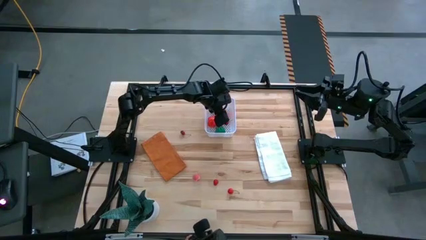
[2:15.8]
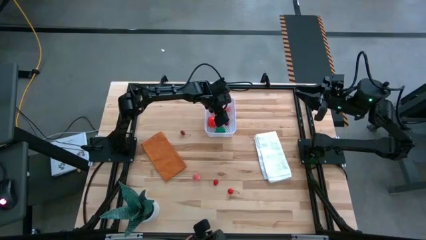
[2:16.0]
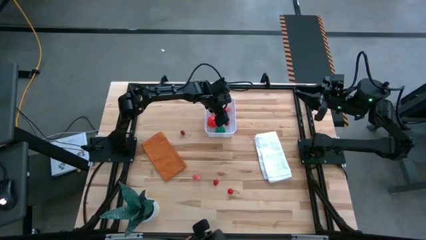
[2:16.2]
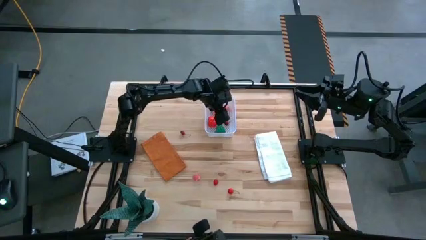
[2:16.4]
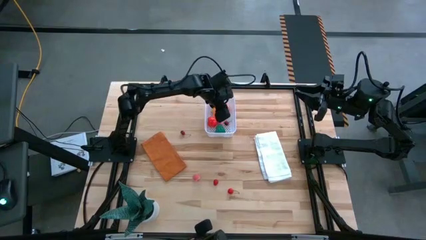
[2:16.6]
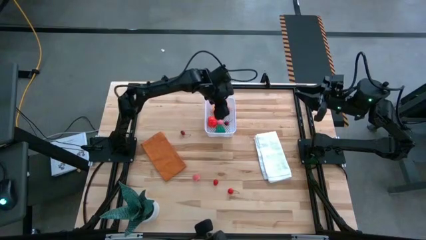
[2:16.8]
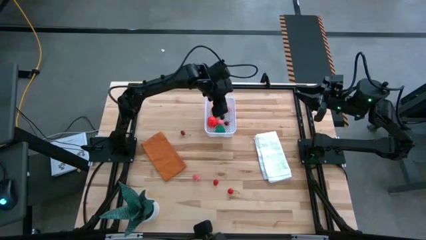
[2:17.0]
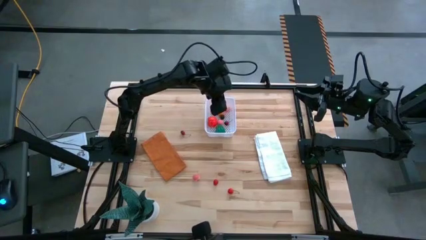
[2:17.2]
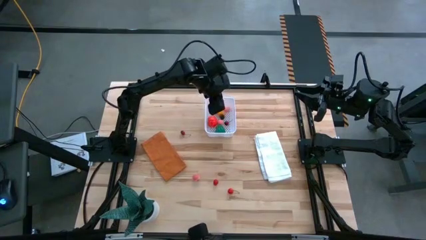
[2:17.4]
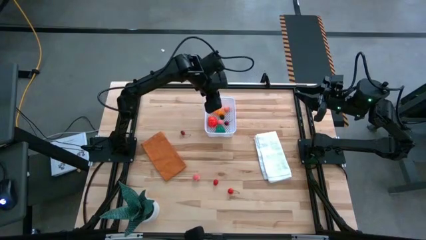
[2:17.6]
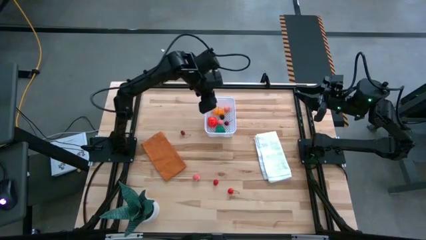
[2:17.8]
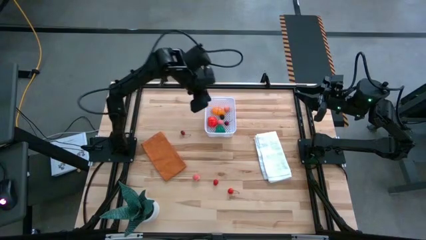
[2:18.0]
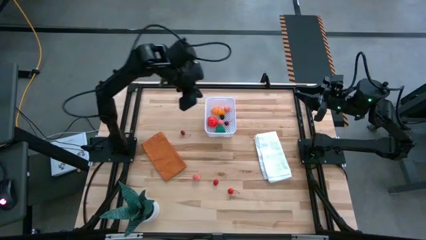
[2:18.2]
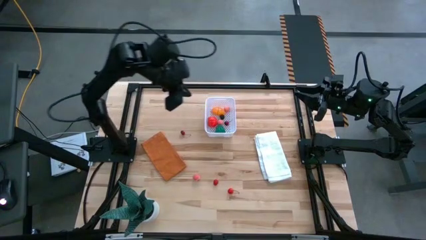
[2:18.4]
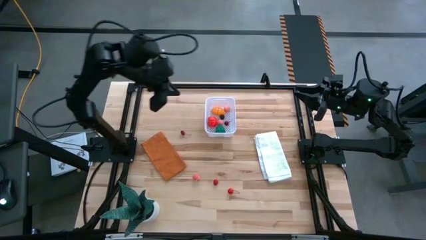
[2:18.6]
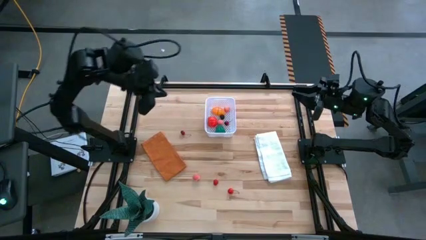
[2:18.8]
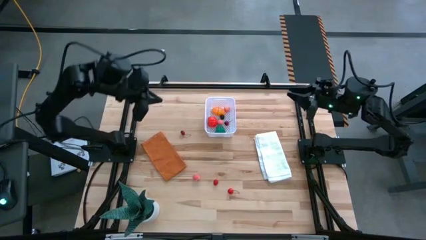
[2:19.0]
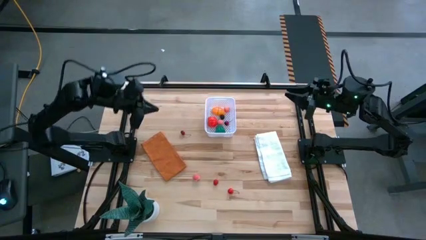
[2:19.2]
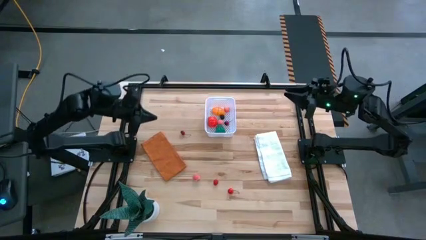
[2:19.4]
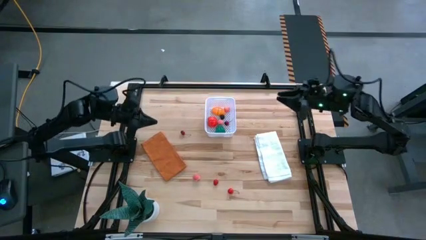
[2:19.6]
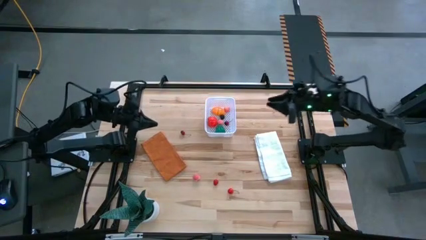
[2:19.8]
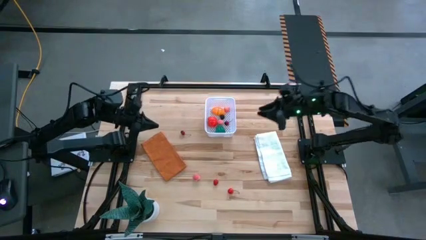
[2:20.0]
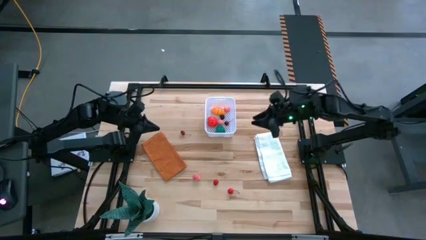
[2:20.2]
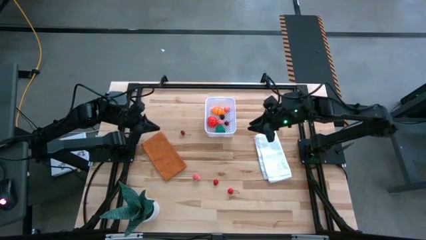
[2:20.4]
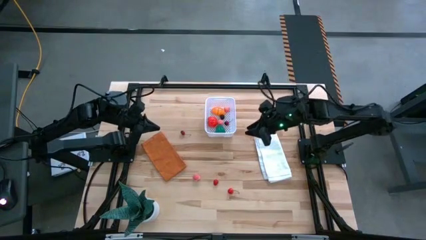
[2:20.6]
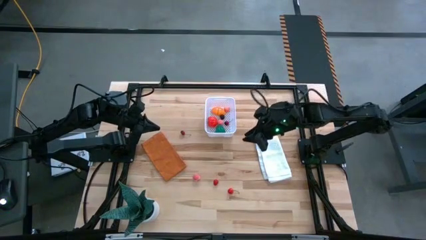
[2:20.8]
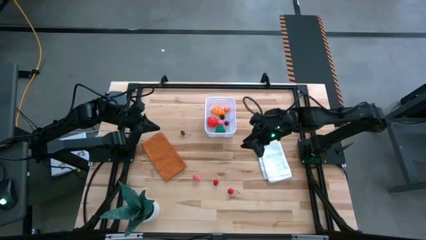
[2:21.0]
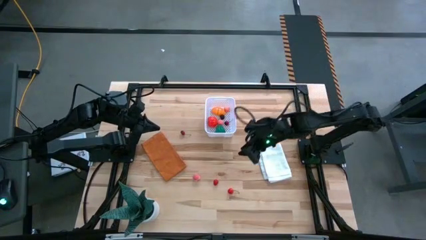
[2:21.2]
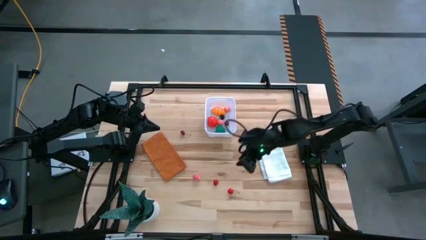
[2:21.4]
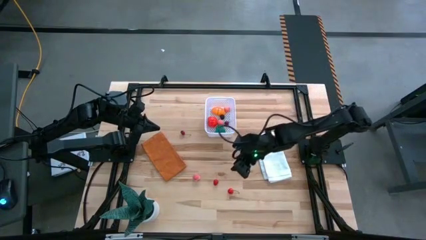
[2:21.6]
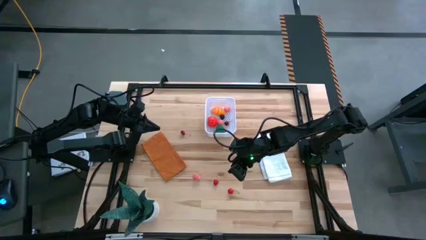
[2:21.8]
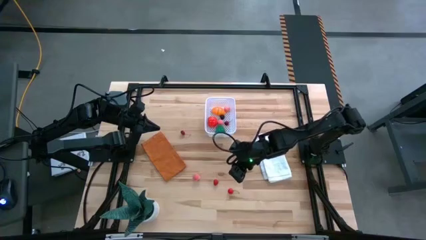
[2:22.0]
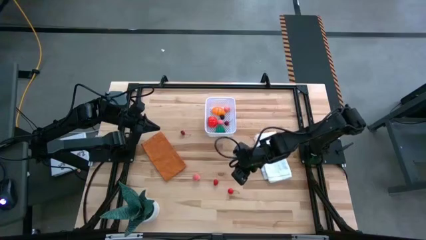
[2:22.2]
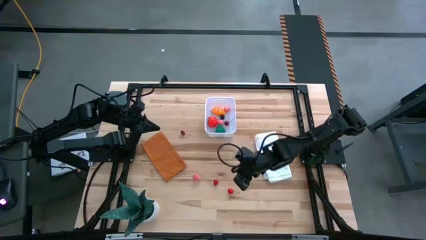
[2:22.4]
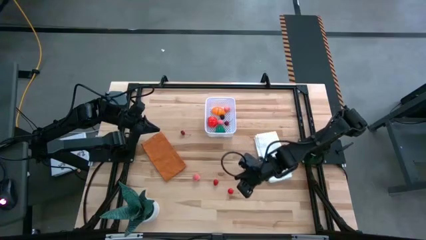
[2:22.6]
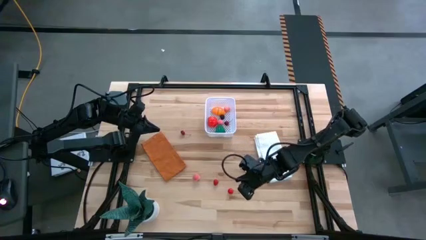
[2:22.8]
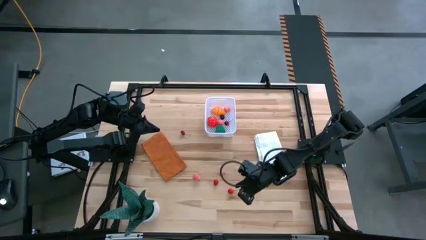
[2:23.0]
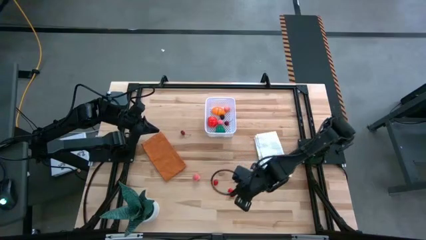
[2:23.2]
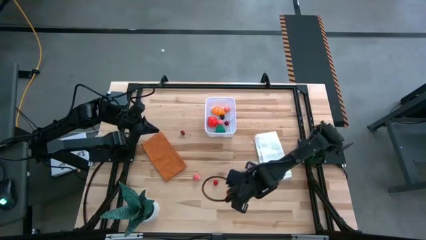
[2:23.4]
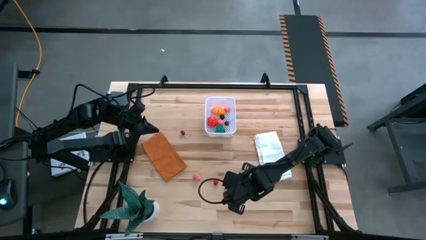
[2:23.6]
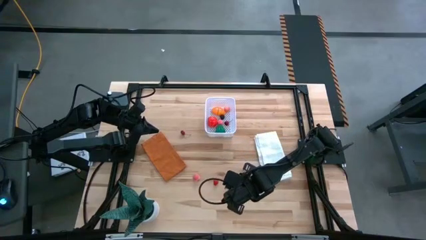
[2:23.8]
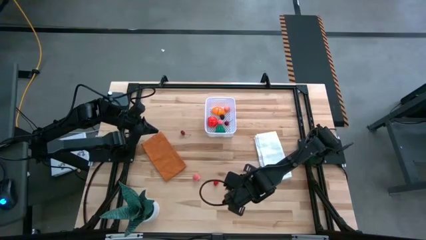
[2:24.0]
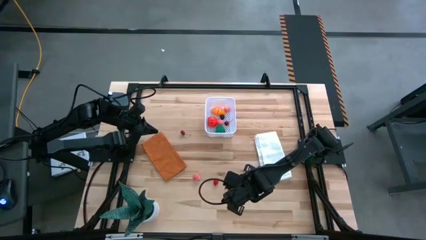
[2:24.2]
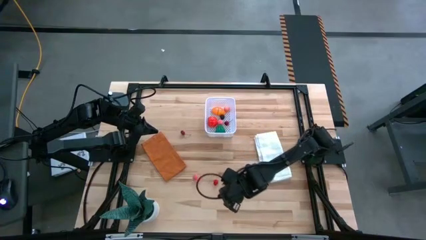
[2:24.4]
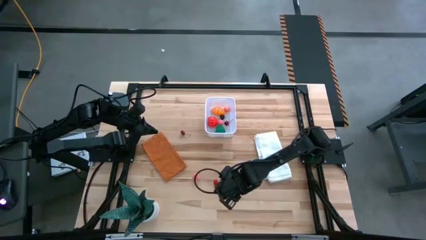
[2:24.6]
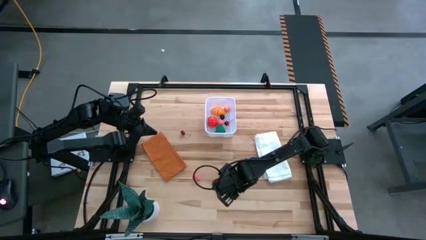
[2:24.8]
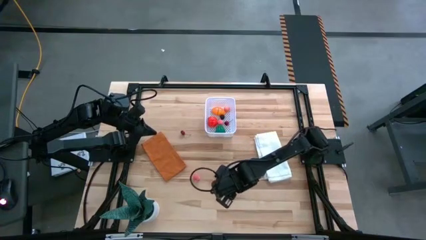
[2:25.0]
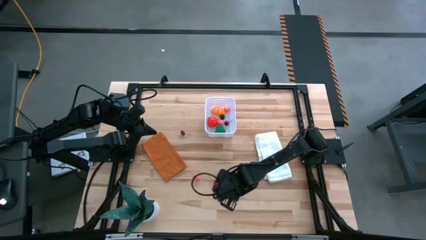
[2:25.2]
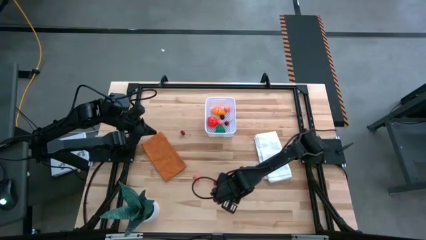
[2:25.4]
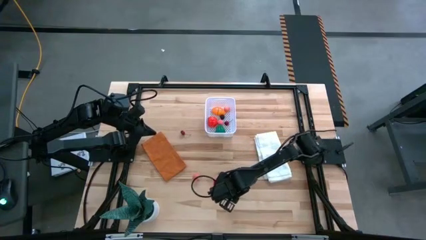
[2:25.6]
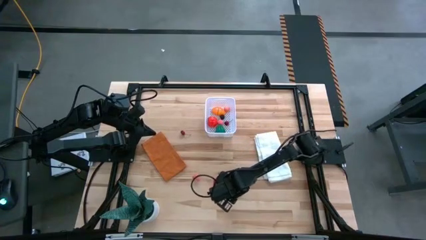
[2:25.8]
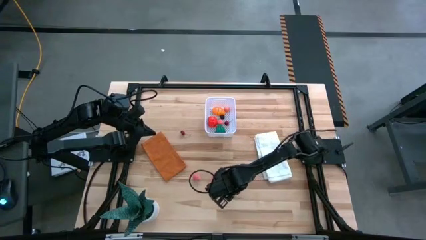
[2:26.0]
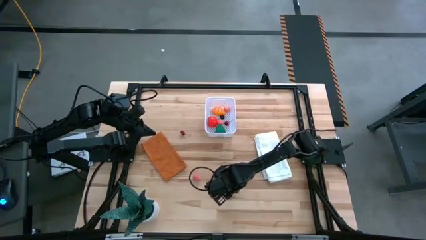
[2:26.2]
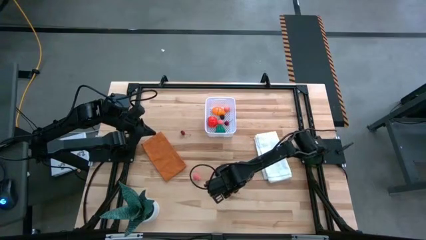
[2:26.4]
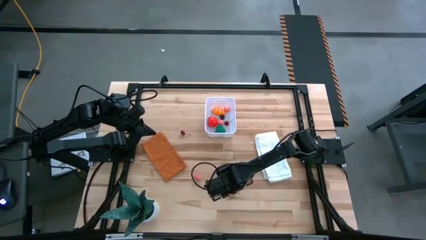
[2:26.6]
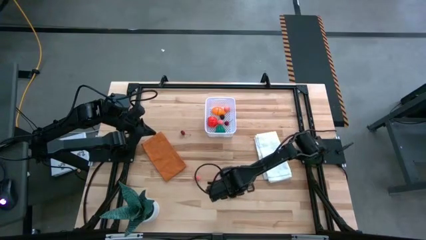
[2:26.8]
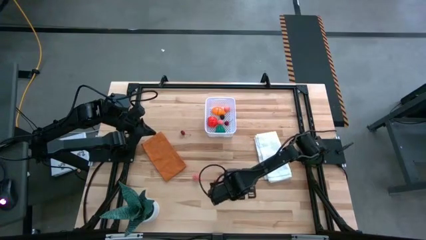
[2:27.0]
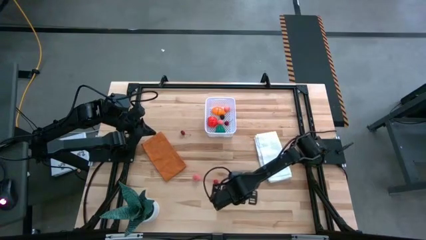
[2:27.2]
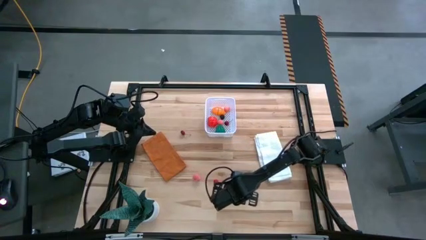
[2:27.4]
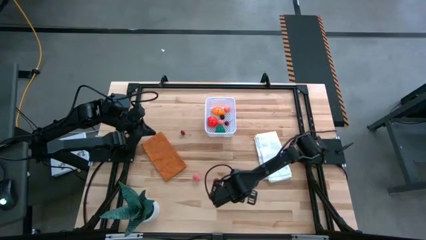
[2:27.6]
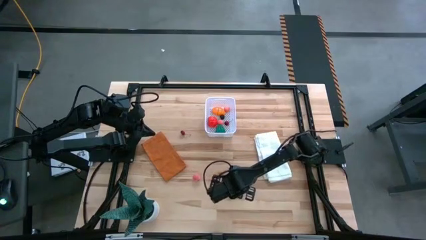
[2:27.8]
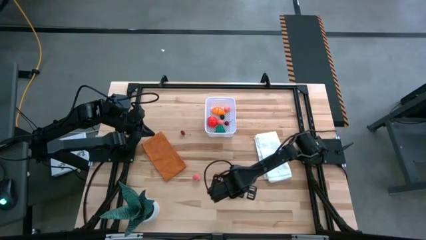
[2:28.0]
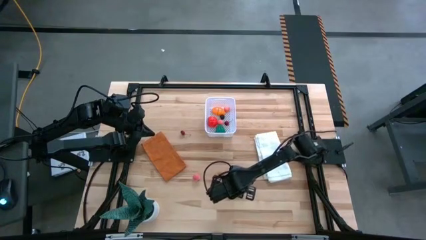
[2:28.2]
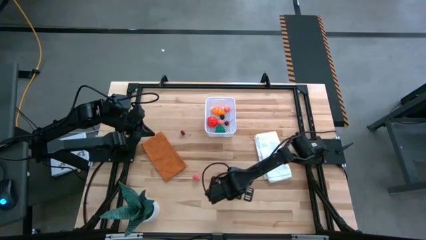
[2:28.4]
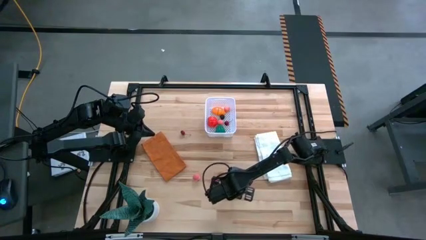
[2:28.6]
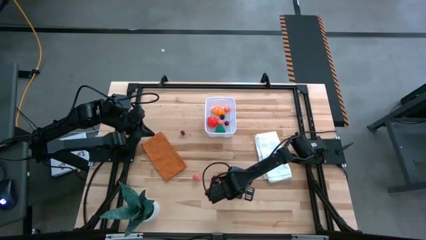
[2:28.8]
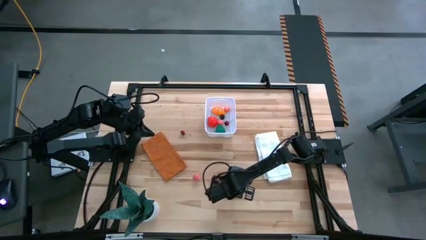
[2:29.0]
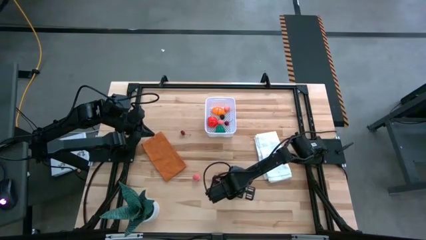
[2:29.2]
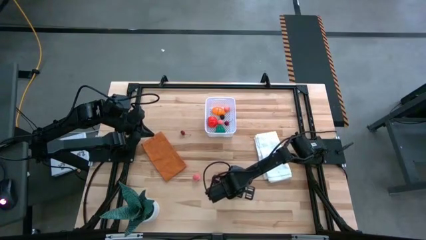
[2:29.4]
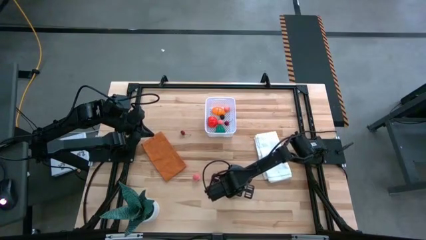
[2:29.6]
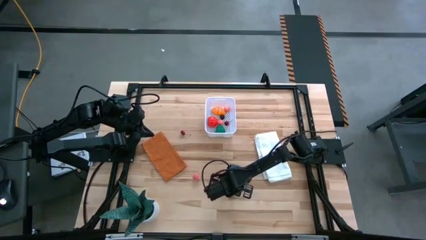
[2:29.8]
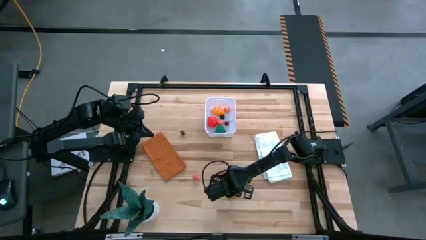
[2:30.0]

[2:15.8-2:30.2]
Task: Pick and placing Produce into tupperware
Put the red cherry into the white bin

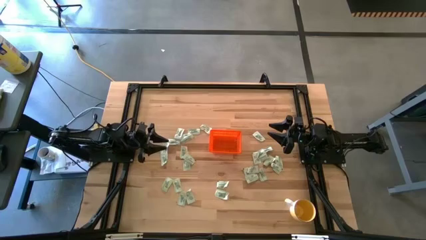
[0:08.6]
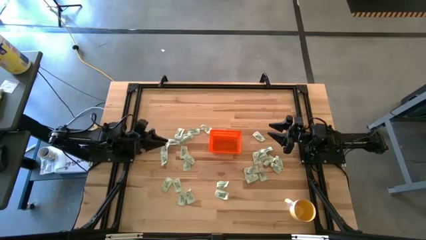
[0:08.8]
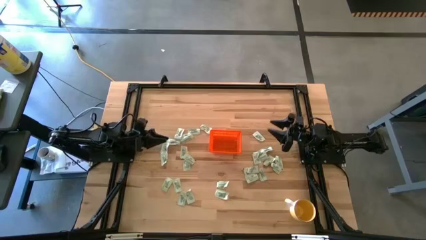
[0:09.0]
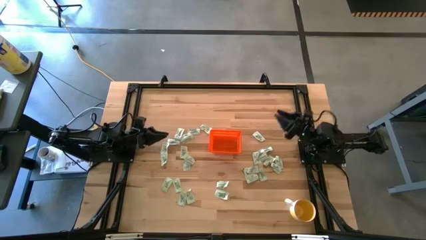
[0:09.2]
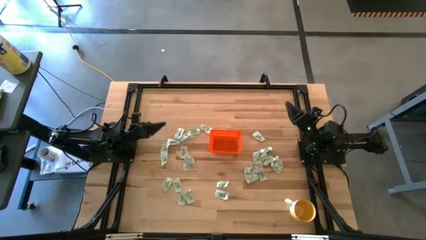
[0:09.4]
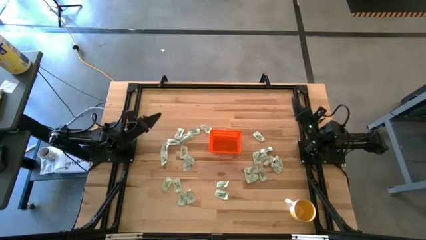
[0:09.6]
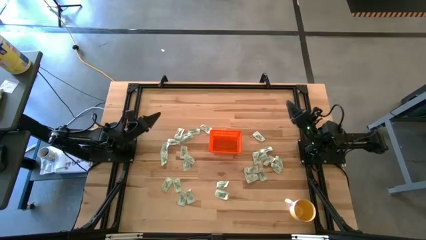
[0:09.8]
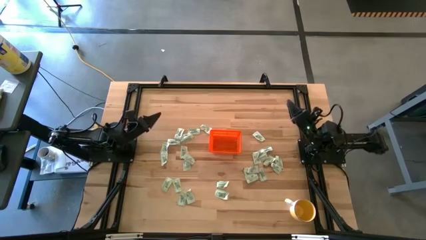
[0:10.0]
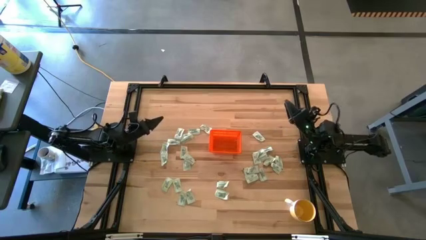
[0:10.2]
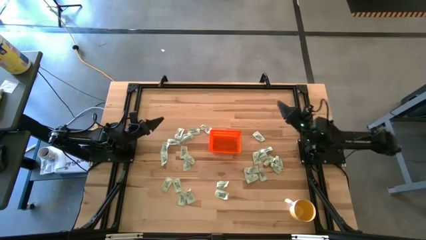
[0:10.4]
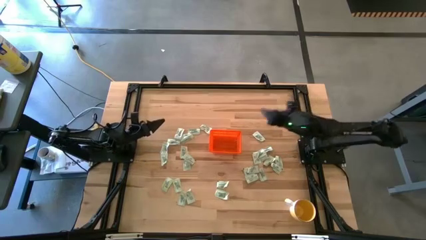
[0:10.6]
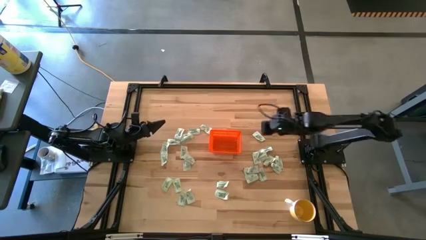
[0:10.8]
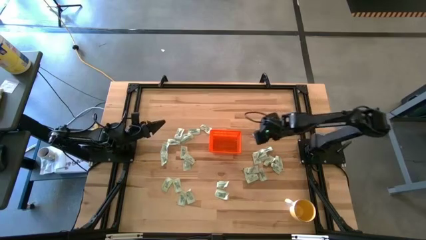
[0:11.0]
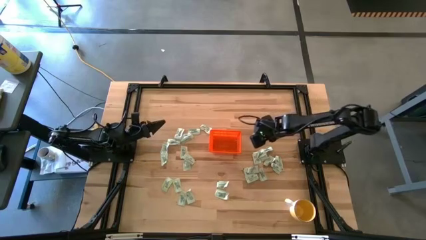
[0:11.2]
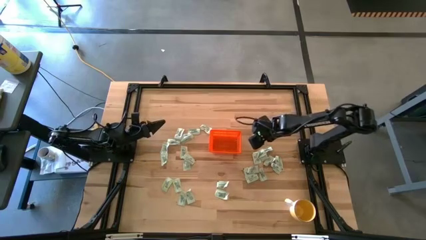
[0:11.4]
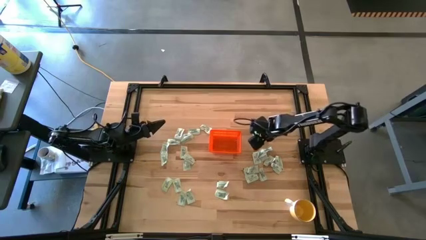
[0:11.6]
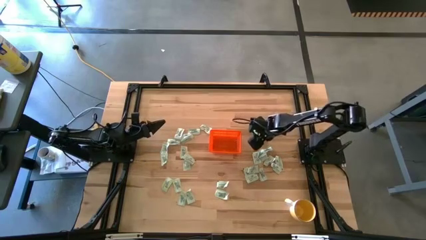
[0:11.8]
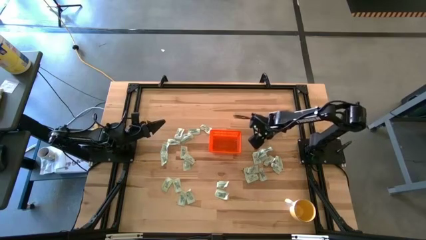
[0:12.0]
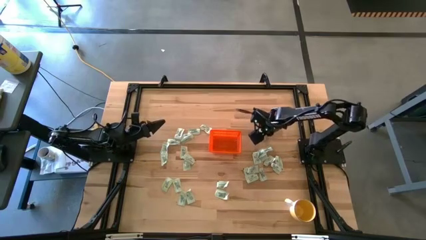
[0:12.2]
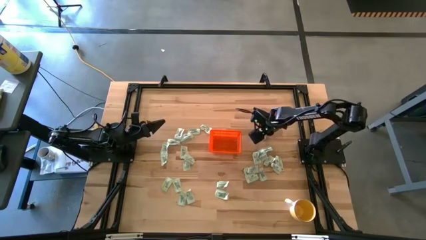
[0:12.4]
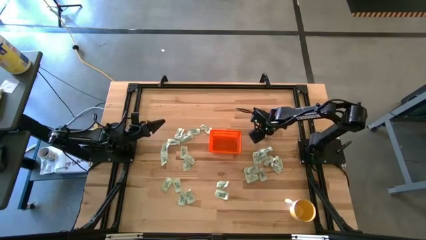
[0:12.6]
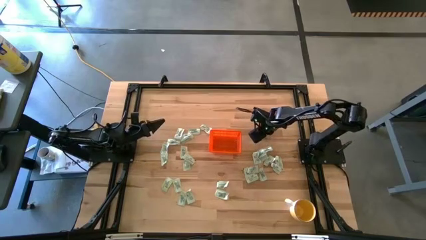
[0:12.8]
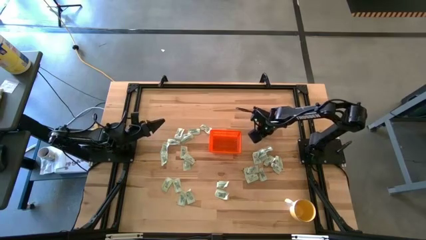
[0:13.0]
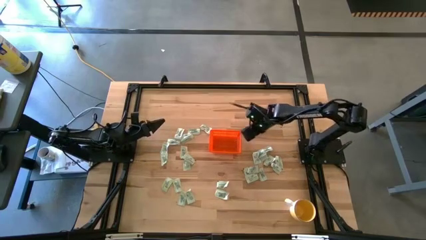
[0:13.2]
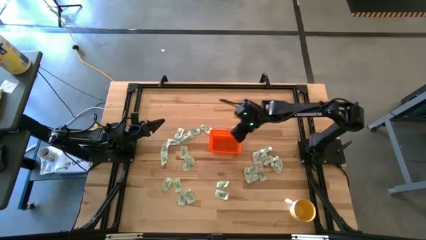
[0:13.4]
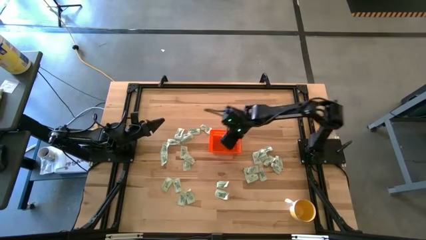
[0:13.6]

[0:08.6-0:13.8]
Task: Pick and place Stevia / Truvia into bins
Put the light green stevia packet into the orange basket
